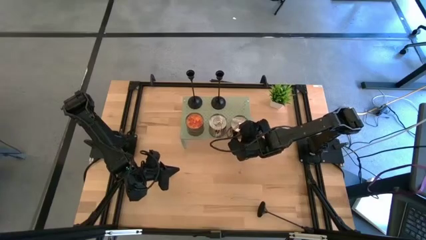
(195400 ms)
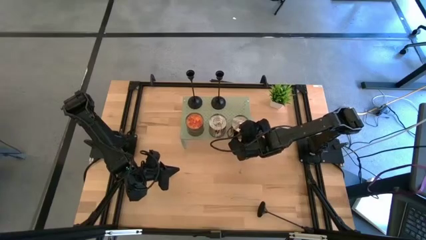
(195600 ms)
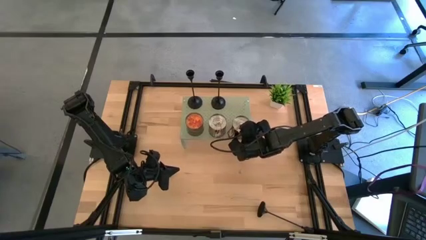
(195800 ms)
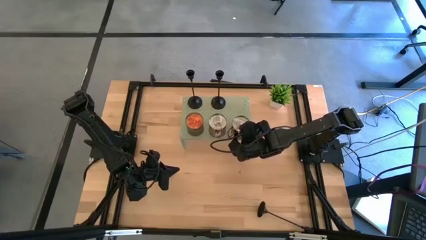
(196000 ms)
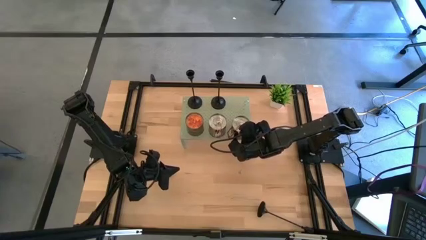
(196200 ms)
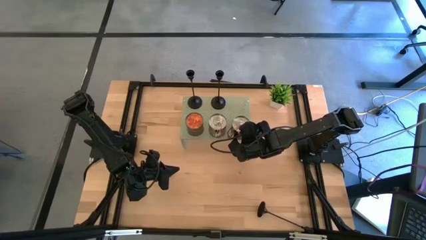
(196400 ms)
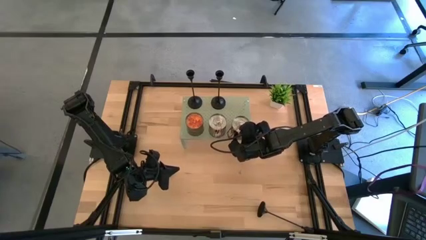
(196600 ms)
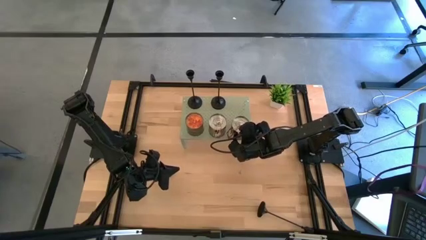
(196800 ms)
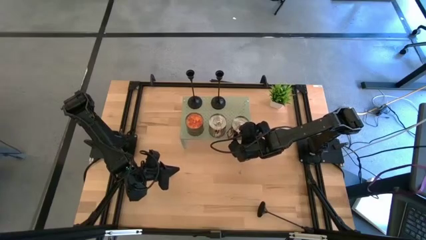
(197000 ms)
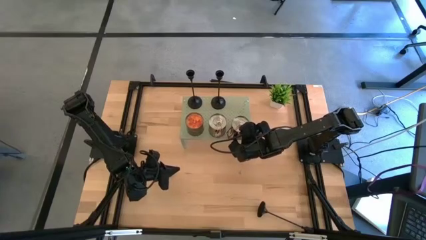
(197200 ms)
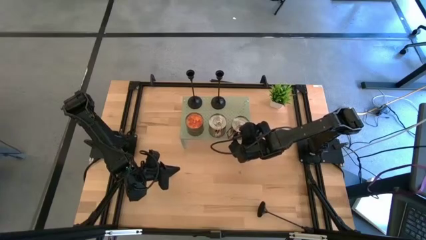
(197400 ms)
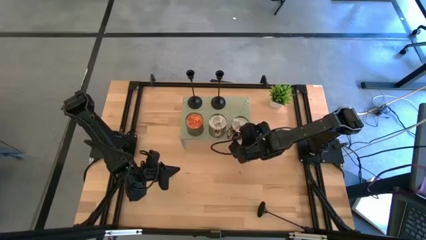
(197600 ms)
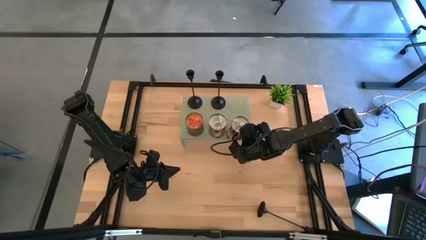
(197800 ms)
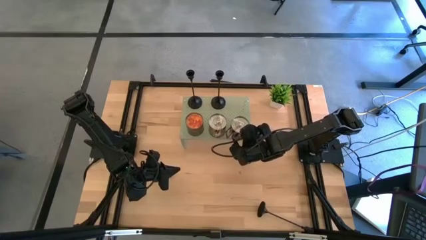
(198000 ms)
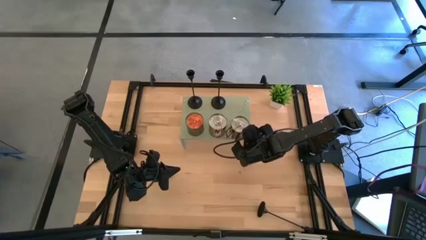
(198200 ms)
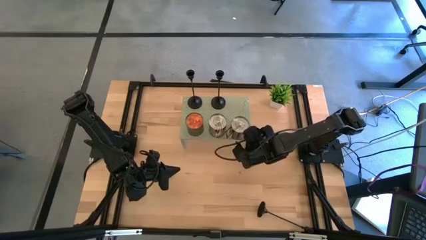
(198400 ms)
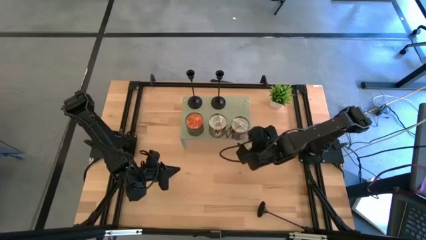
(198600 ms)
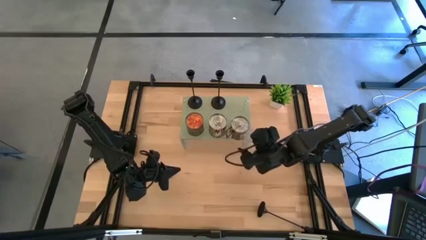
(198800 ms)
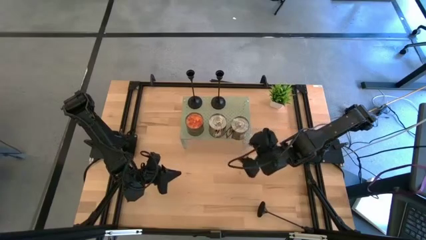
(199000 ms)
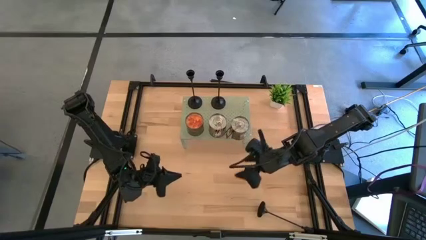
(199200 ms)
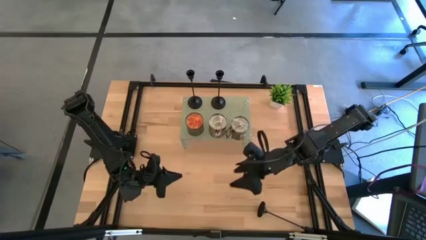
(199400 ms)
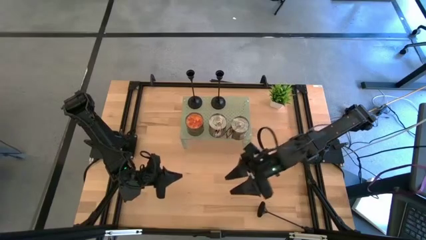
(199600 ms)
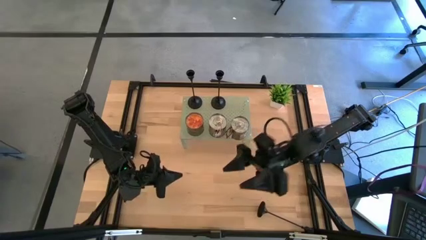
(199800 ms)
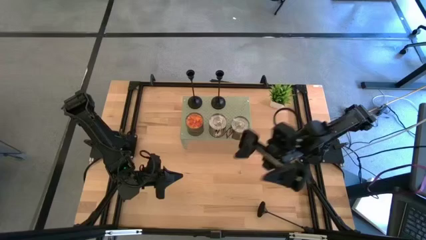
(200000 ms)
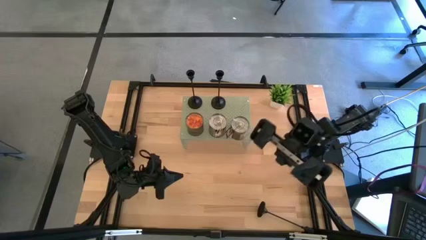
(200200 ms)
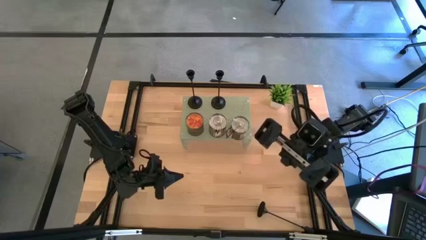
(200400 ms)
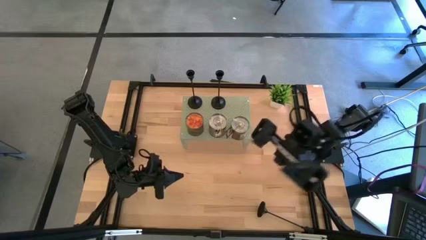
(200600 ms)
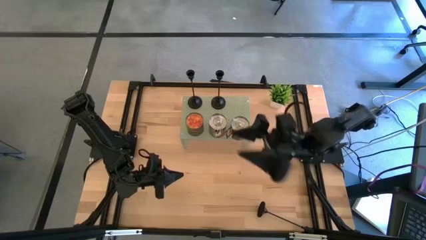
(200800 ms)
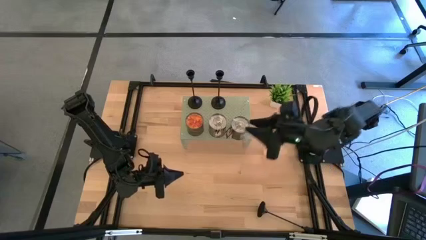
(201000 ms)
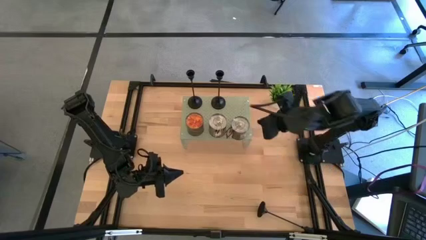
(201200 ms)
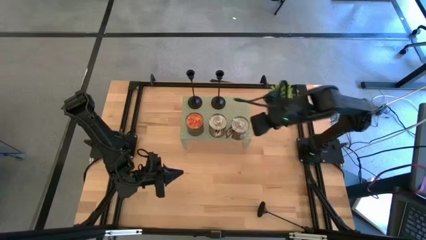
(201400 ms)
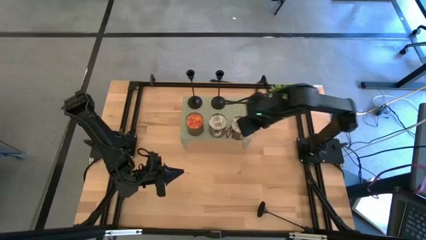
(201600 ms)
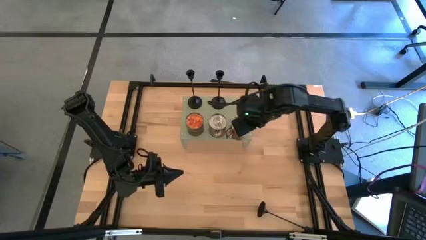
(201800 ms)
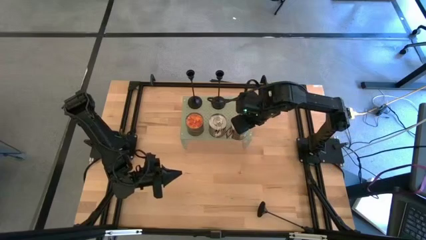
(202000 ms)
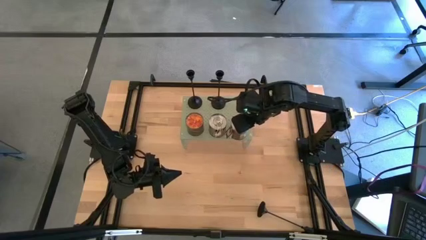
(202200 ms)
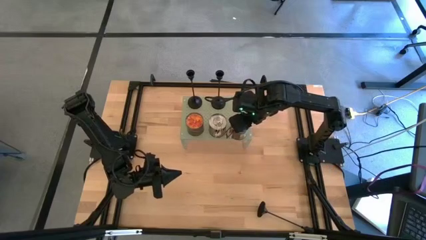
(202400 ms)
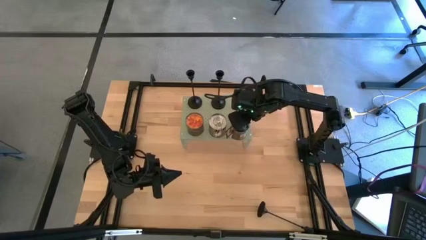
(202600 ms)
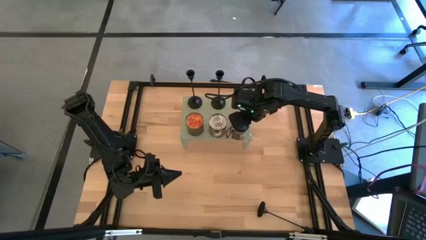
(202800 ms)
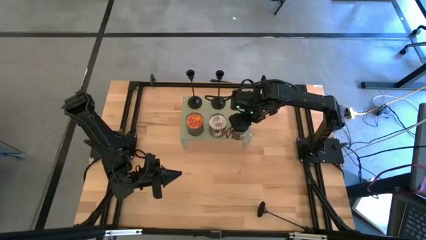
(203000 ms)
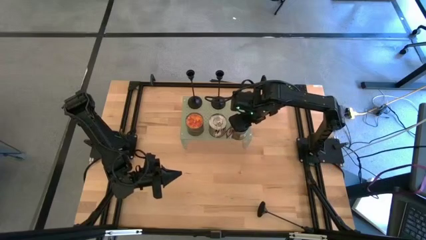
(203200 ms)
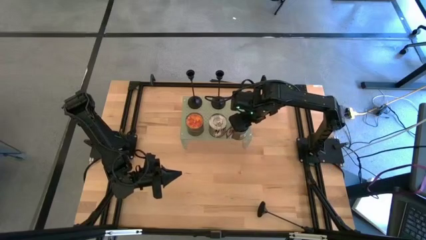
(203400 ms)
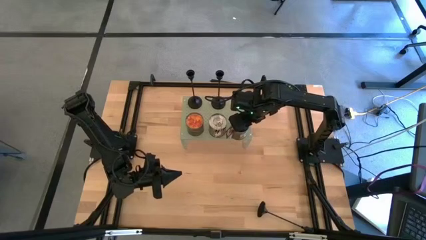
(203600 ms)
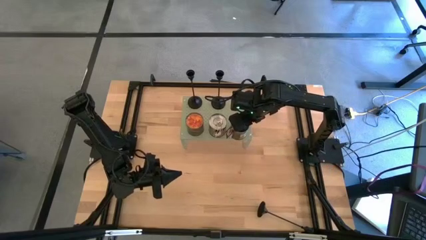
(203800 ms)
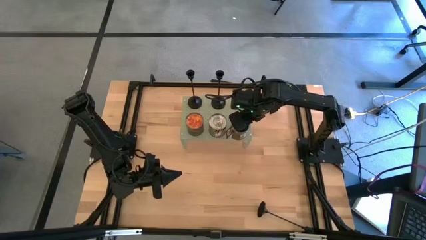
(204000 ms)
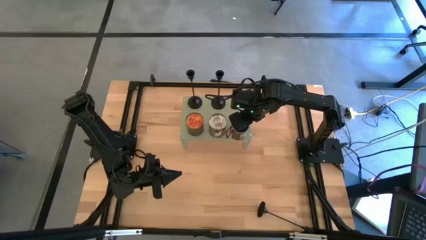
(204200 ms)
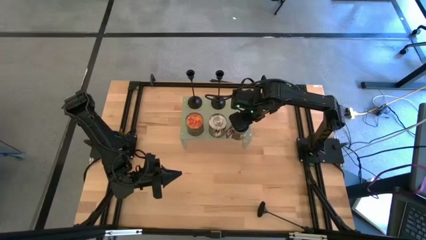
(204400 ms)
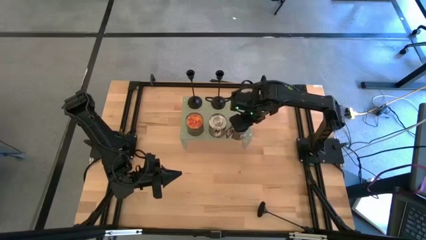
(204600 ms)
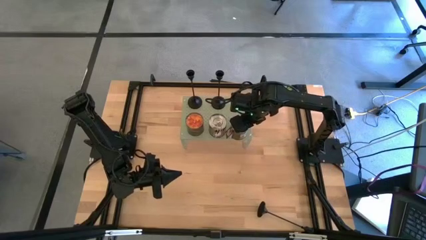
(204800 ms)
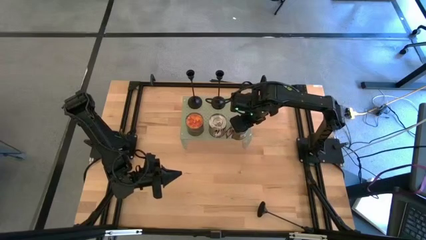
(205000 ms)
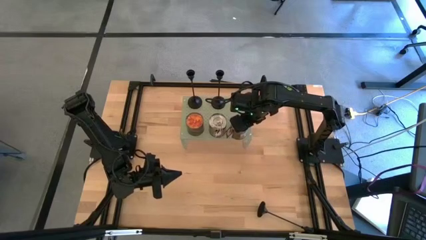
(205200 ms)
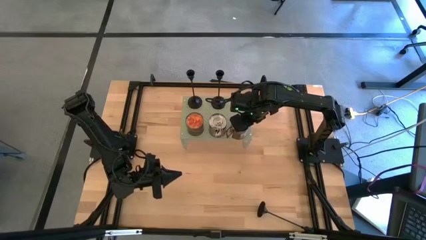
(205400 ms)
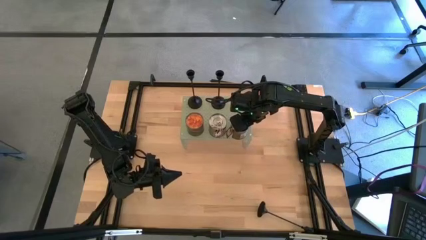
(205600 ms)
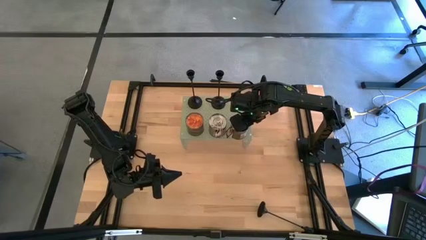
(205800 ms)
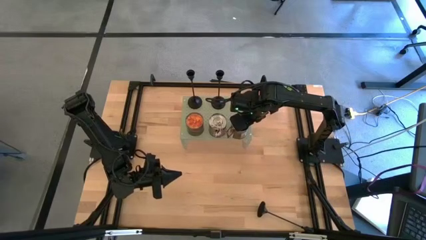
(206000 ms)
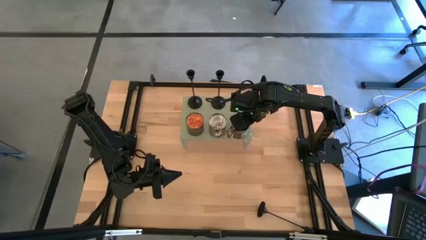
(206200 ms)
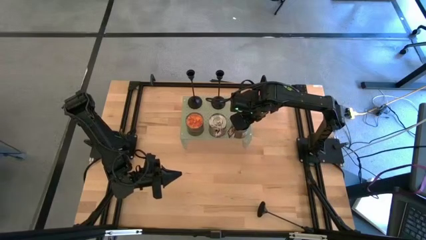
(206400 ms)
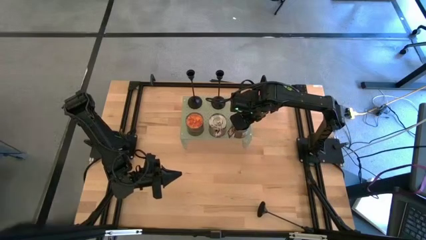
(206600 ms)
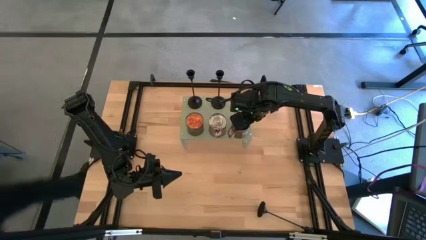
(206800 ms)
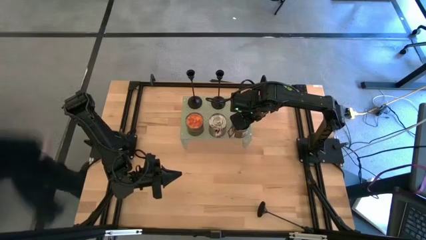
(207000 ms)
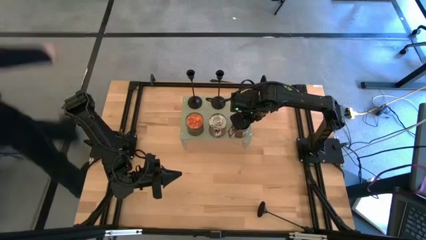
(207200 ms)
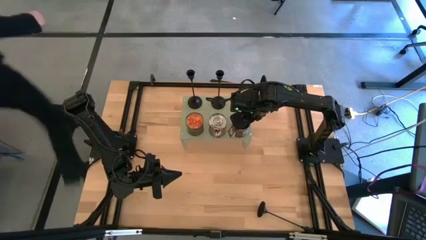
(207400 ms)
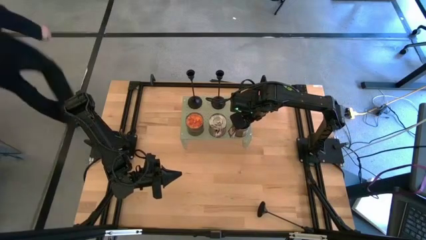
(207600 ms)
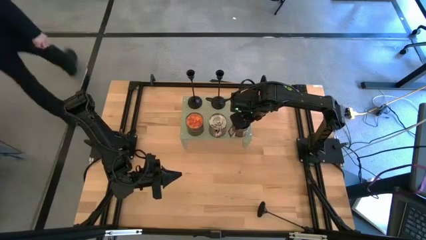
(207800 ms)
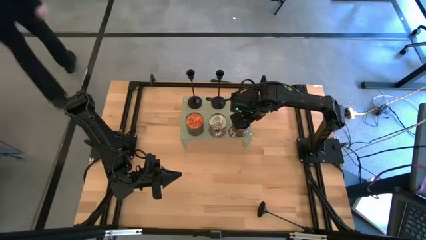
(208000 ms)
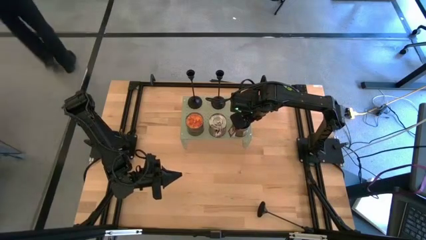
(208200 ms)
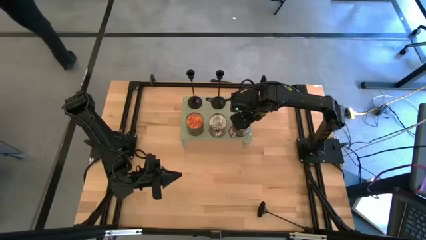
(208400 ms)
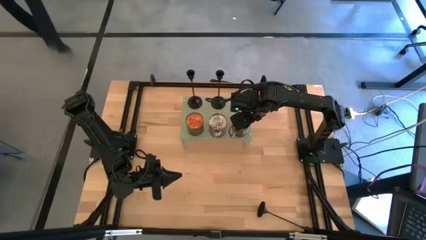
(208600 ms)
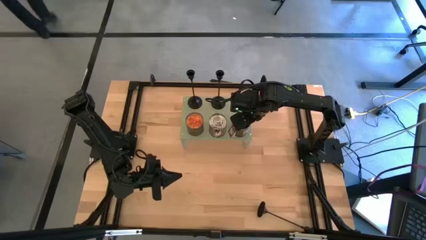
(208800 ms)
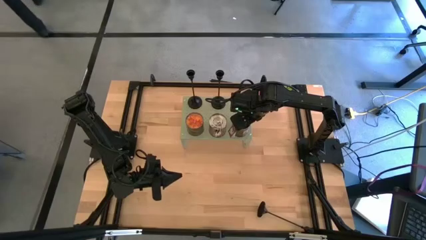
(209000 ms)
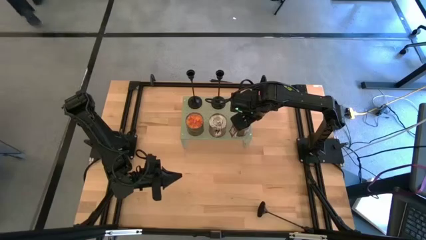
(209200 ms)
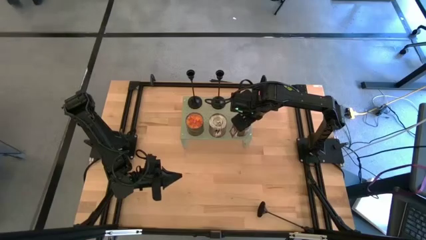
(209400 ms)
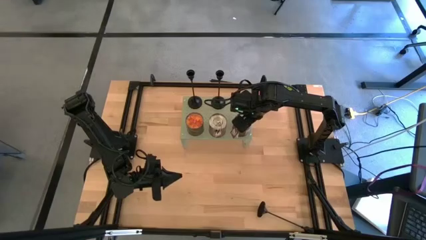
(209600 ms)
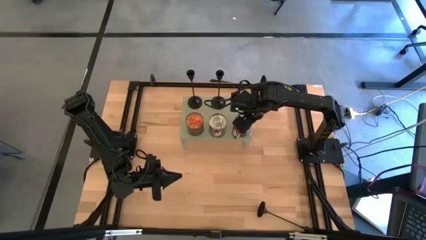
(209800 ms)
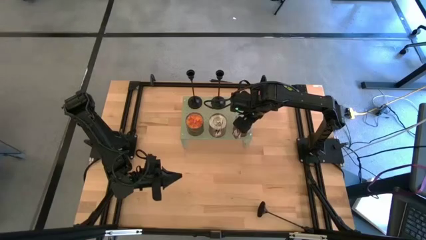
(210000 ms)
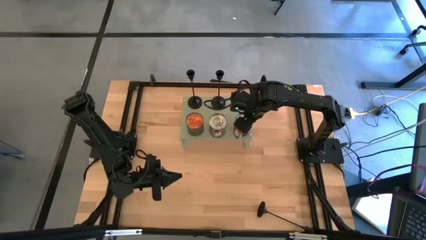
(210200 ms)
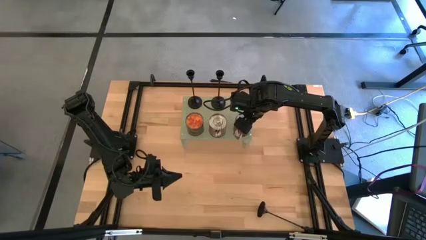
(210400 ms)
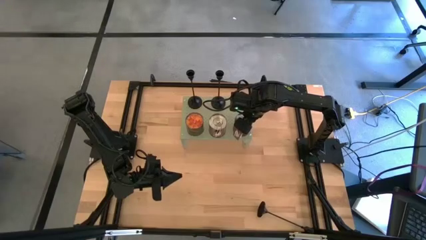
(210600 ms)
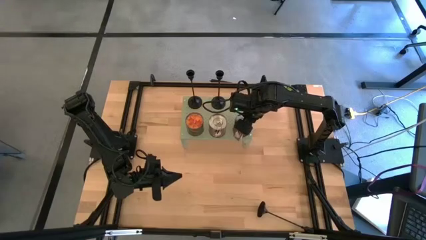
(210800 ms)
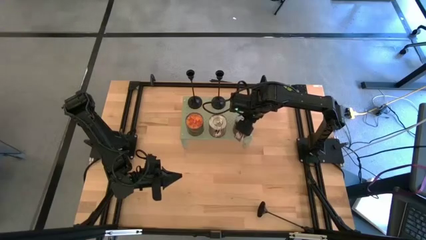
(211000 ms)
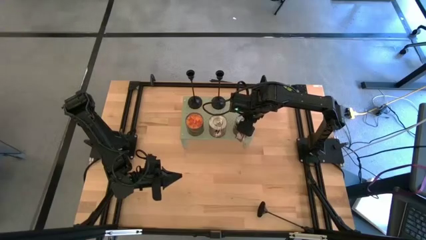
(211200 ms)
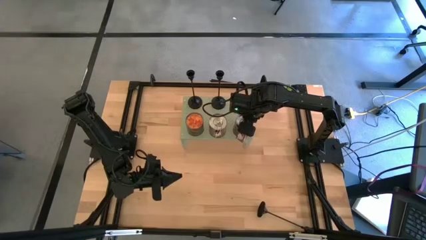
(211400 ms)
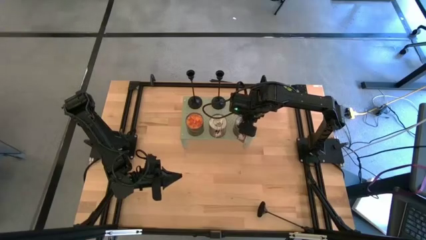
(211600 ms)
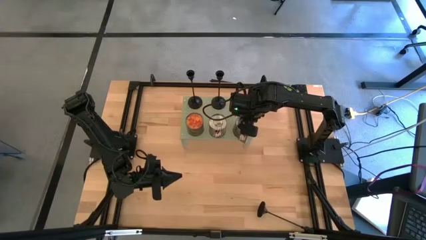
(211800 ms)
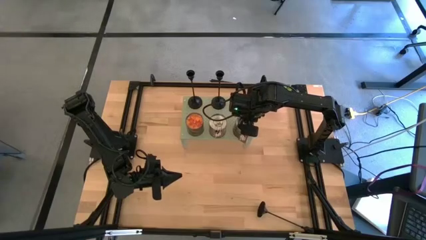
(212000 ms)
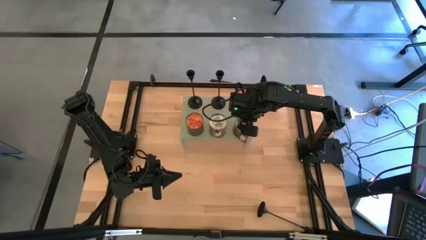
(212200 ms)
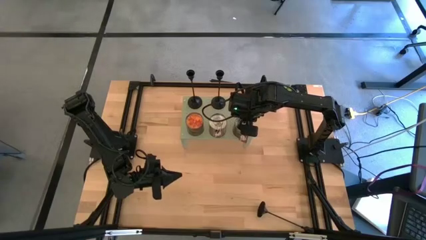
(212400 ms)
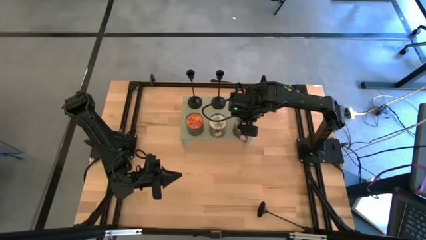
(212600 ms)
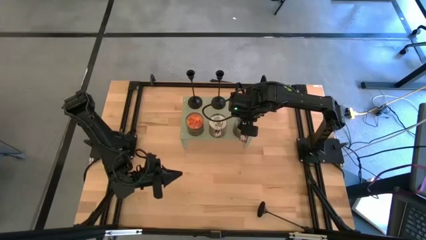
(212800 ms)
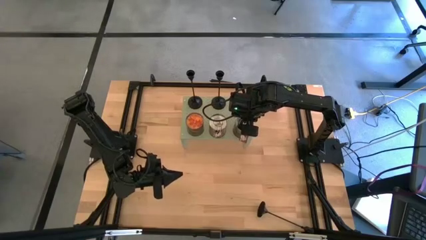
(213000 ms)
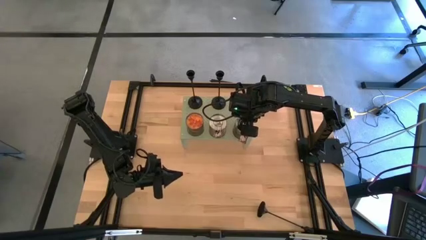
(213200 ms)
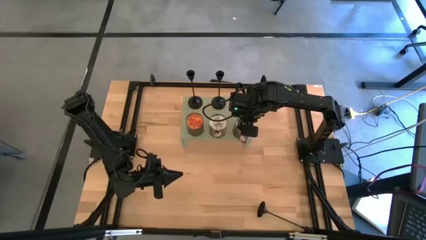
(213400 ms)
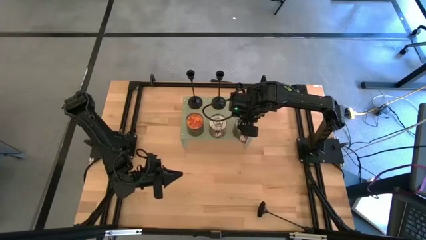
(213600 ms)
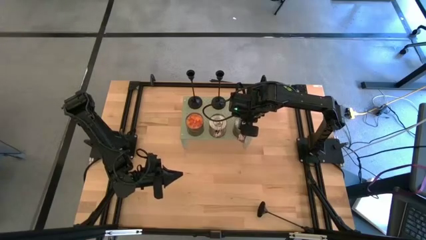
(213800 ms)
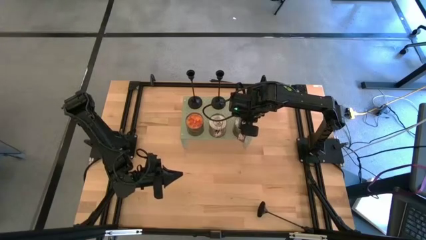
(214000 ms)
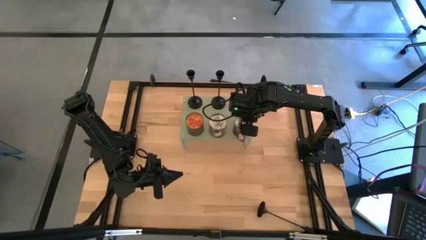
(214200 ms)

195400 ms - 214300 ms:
Task: Pick & Place candle stick holders
Put the brown scented candle on the shelf aligned with the other brown scented candle
